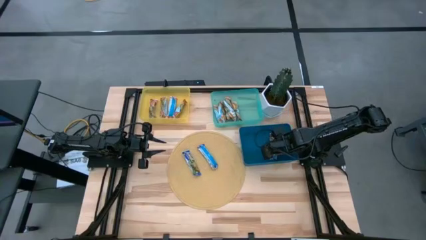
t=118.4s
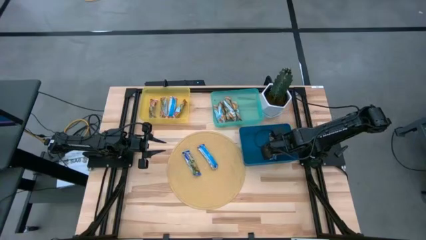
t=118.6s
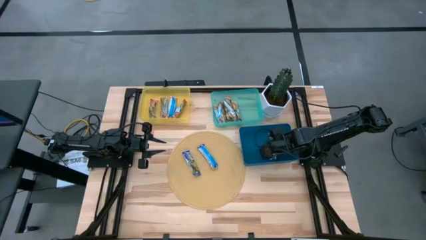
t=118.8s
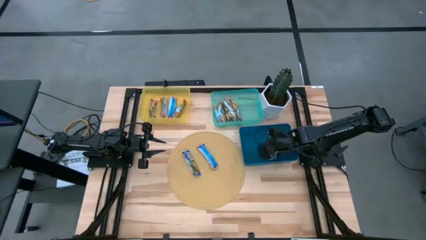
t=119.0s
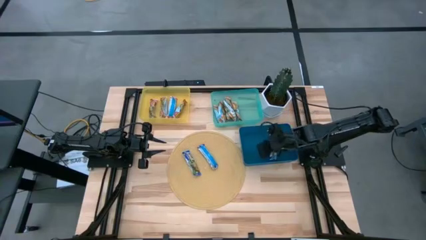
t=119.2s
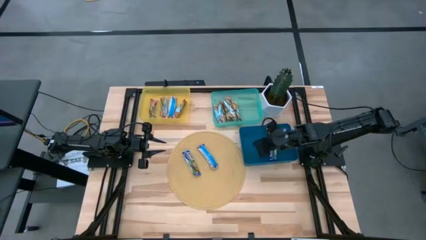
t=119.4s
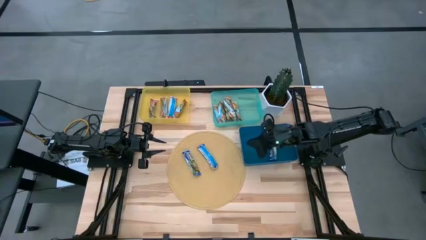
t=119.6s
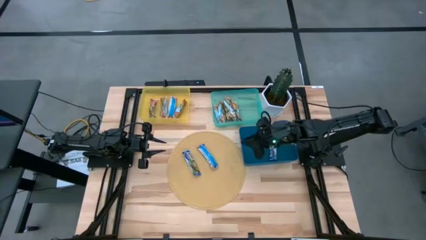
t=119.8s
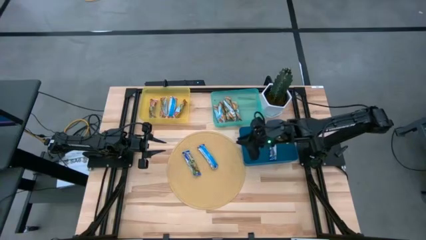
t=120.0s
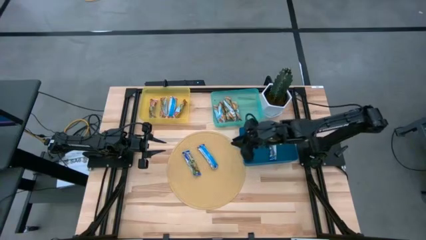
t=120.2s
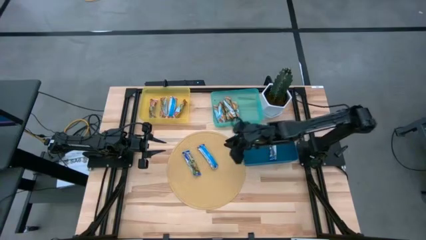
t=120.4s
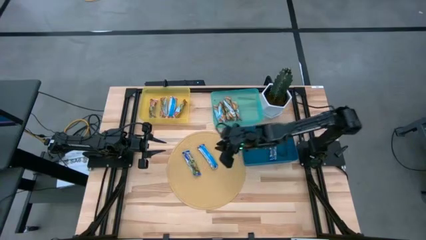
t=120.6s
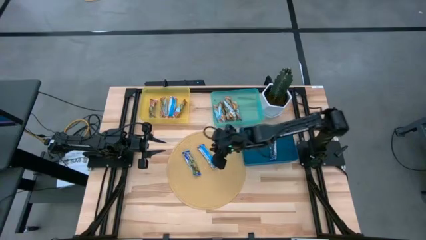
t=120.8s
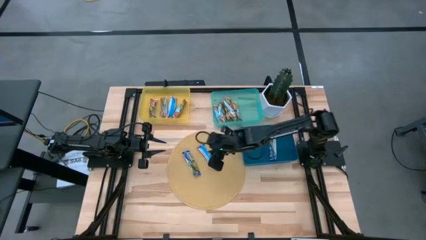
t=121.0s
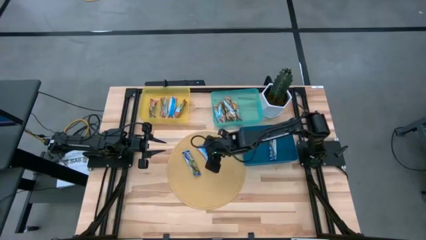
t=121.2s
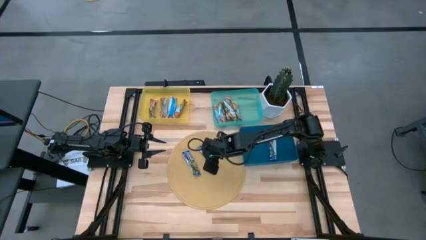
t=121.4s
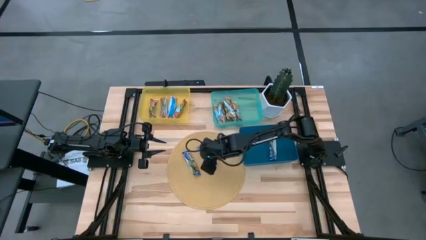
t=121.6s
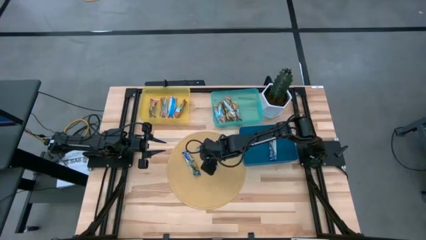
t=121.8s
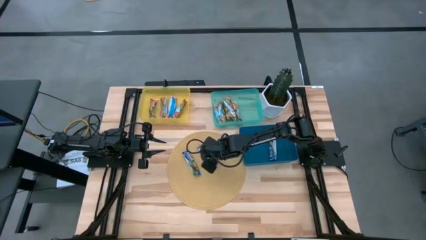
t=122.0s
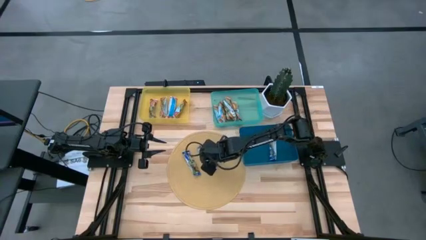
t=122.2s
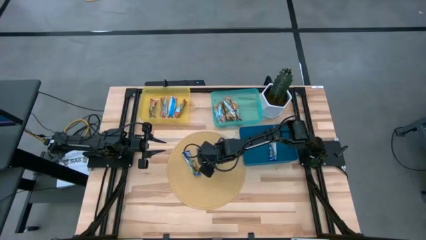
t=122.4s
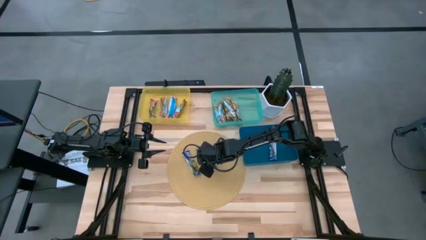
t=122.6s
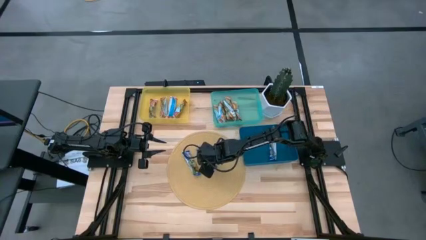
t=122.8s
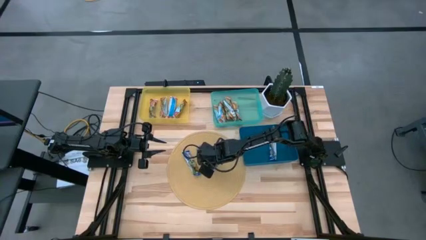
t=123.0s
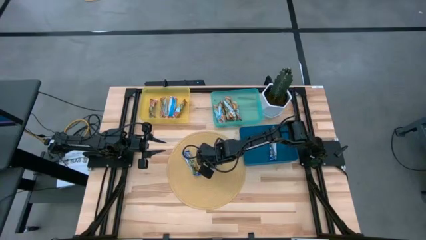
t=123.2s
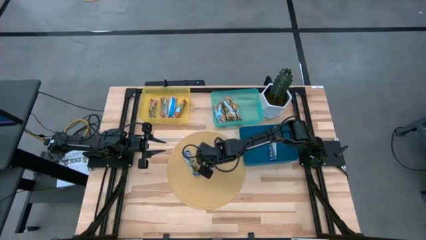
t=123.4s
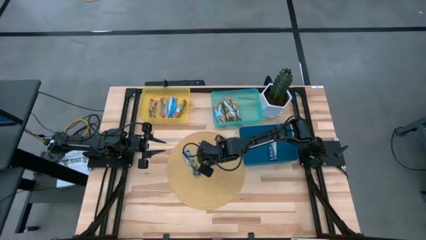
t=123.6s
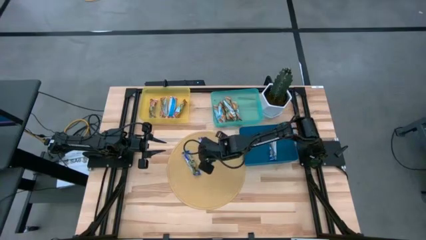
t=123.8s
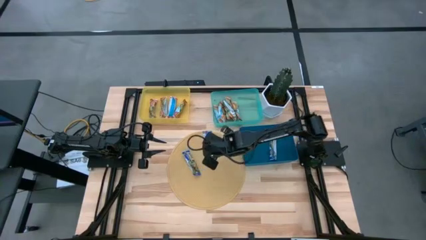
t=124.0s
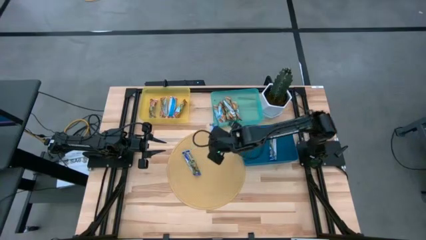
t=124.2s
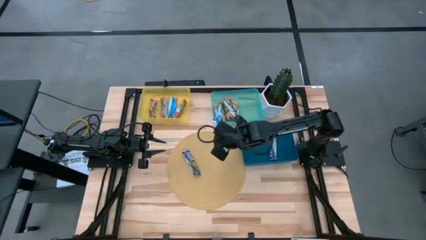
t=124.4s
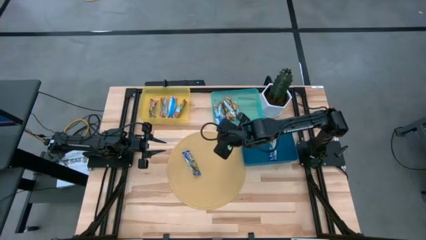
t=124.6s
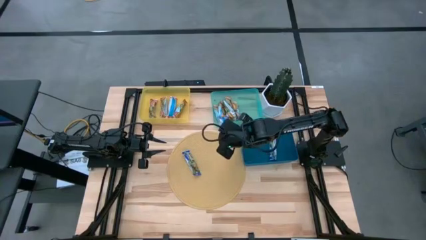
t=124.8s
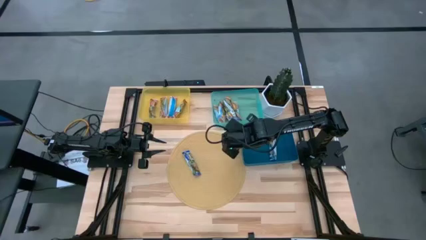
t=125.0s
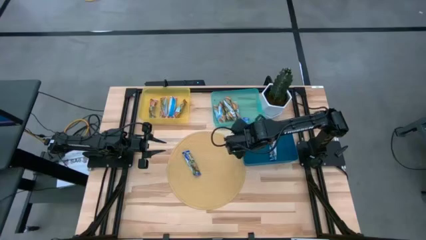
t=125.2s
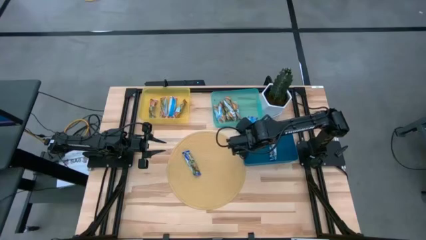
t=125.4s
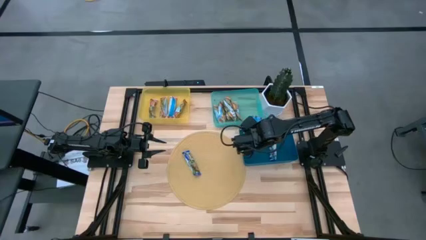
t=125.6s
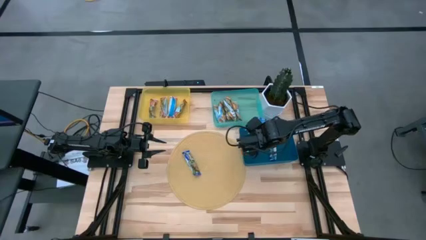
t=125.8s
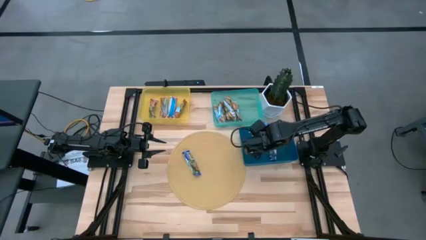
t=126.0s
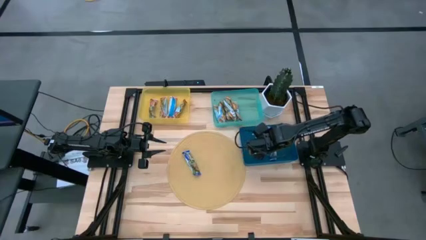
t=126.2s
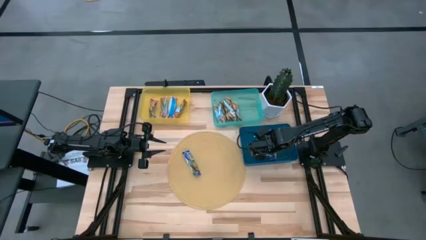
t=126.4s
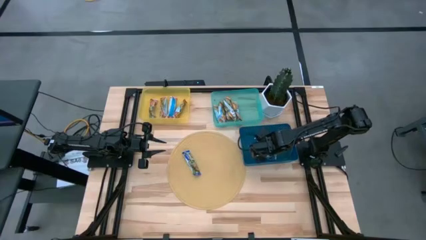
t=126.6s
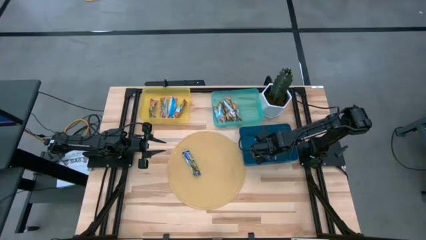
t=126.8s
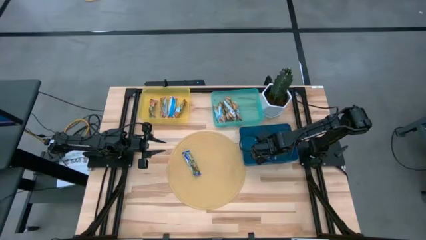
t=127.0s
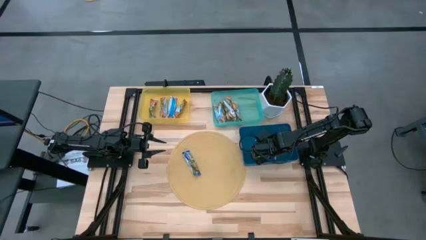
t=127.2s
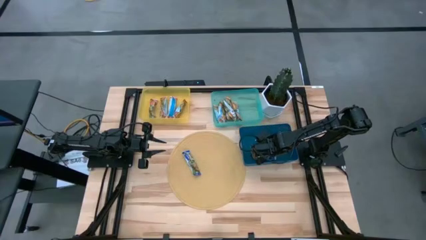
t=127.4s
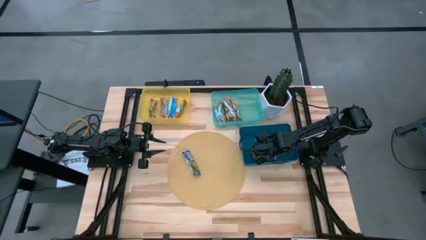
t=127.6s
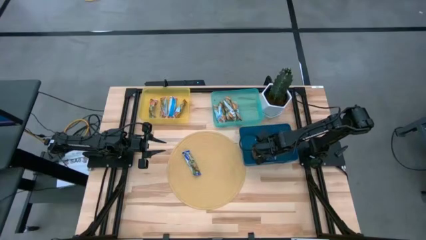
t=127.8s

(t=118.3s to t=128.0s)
Task: Pick and place Granola Bars by type
Put the blue granola bar into the blue bin

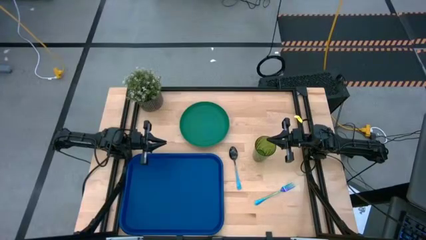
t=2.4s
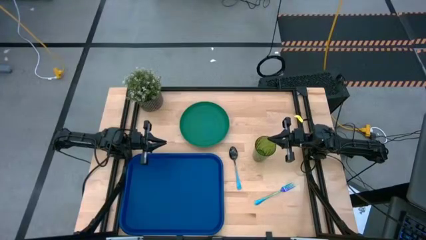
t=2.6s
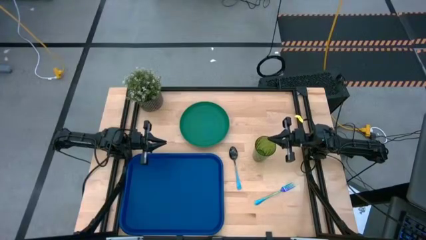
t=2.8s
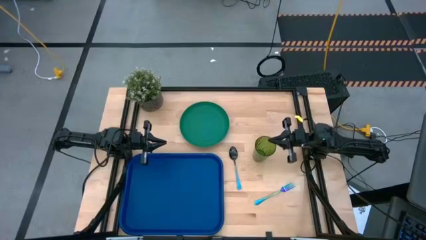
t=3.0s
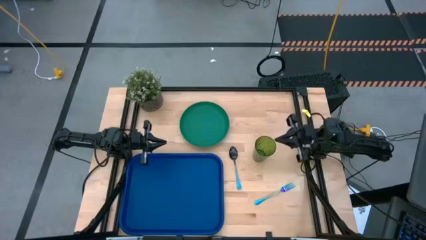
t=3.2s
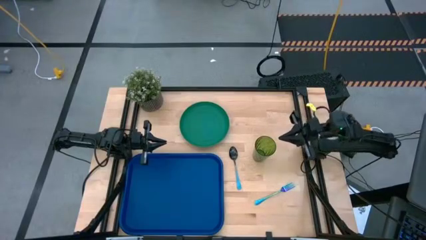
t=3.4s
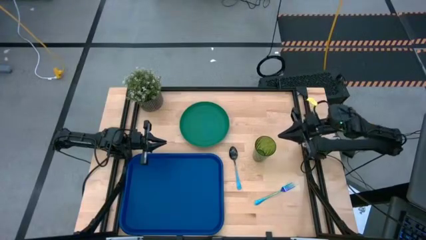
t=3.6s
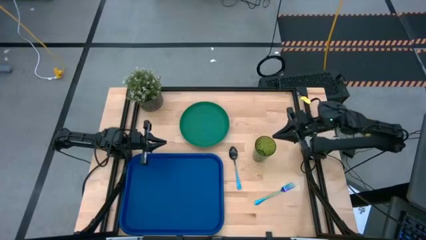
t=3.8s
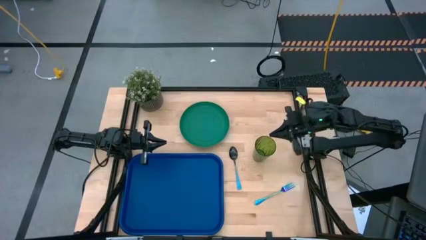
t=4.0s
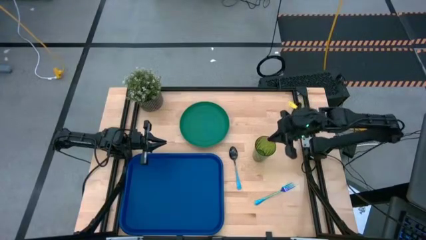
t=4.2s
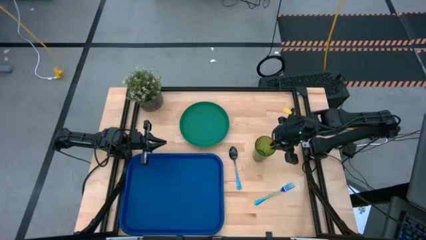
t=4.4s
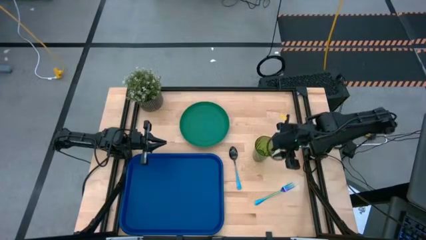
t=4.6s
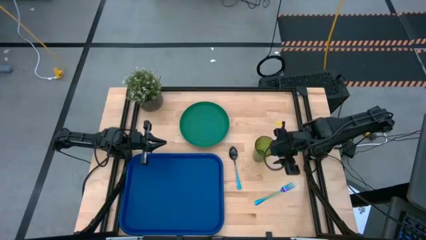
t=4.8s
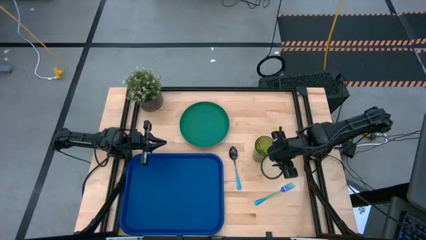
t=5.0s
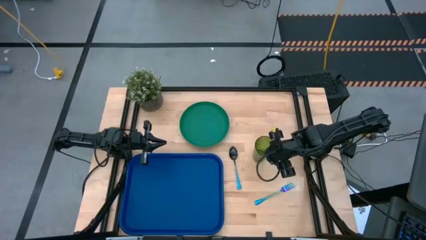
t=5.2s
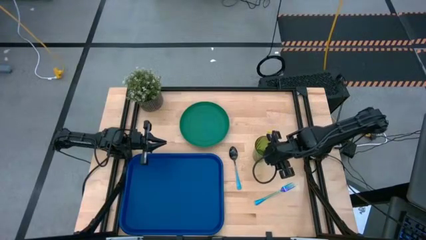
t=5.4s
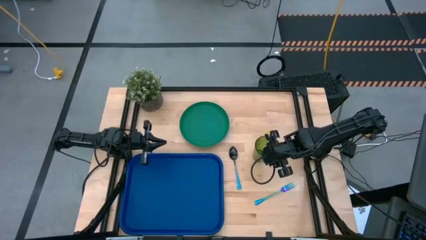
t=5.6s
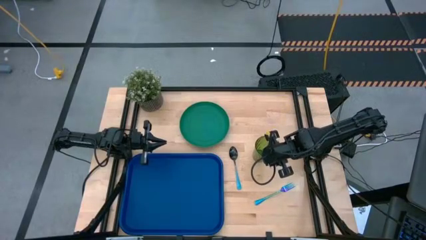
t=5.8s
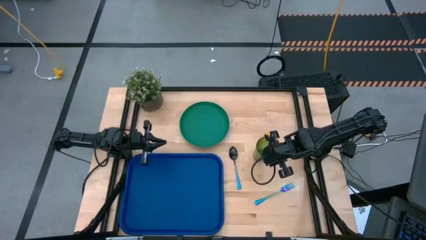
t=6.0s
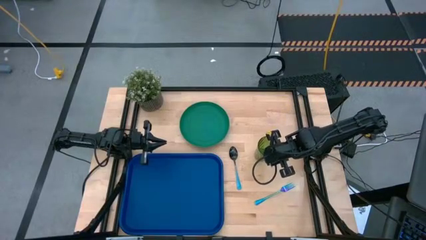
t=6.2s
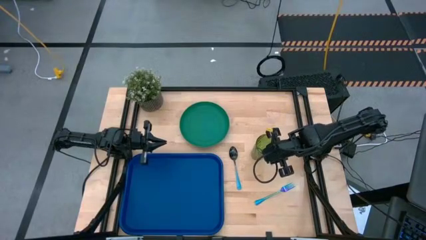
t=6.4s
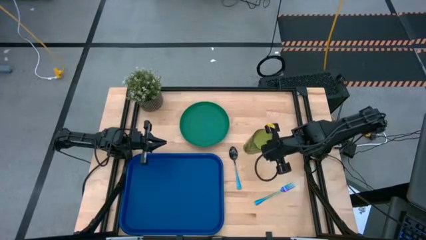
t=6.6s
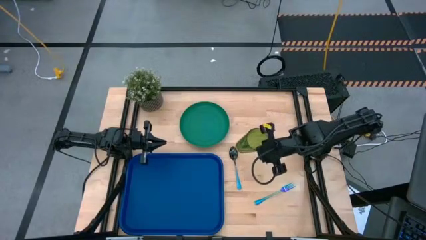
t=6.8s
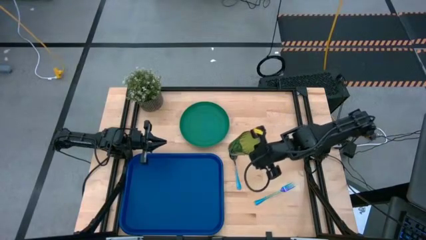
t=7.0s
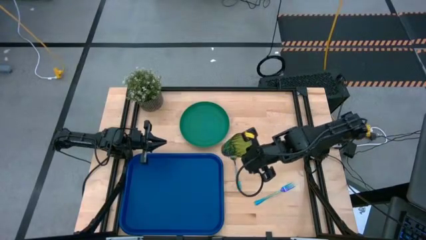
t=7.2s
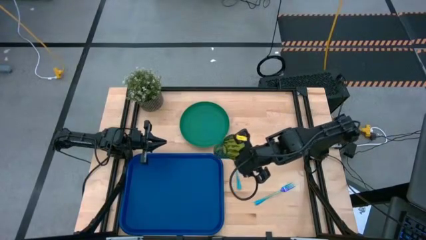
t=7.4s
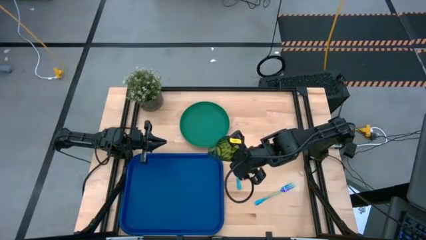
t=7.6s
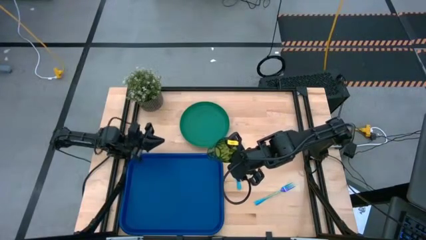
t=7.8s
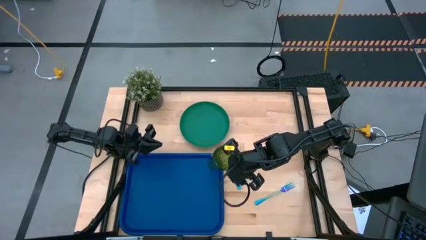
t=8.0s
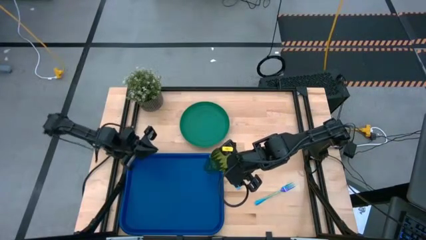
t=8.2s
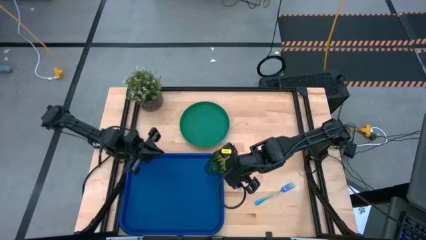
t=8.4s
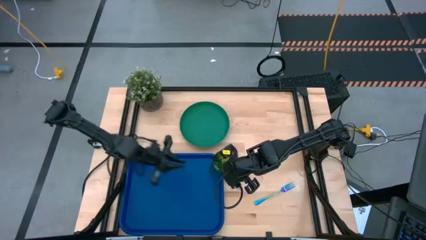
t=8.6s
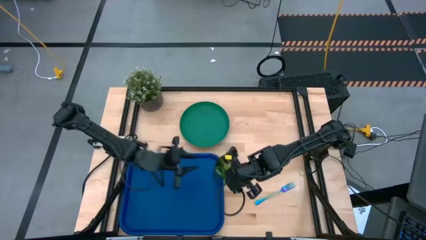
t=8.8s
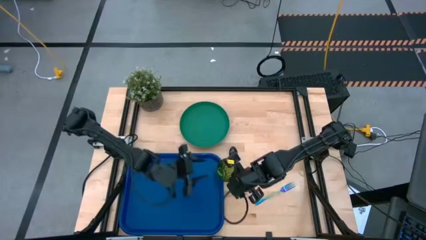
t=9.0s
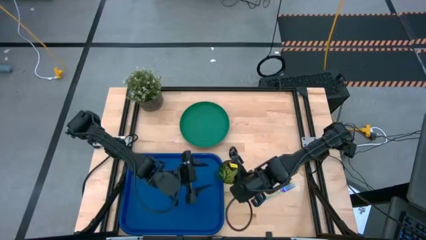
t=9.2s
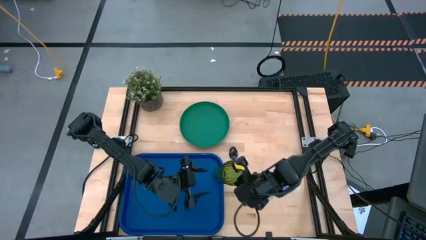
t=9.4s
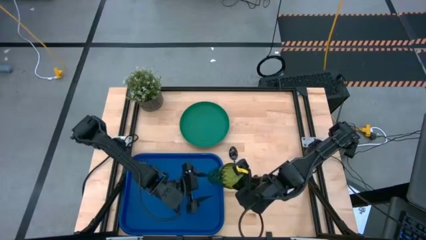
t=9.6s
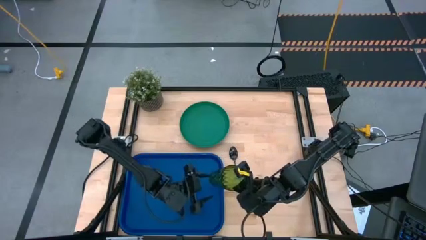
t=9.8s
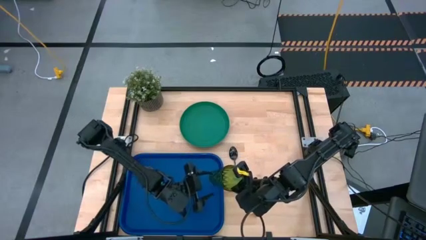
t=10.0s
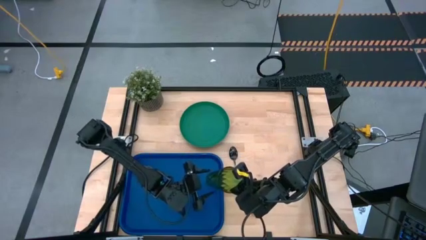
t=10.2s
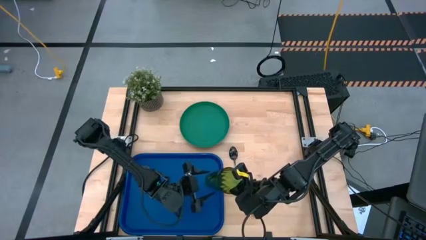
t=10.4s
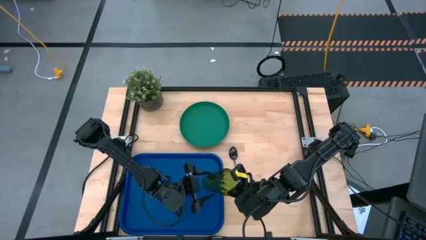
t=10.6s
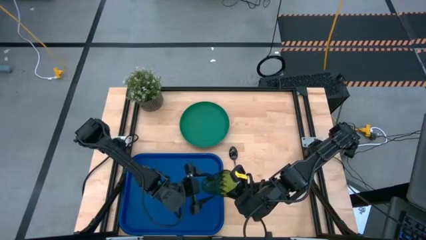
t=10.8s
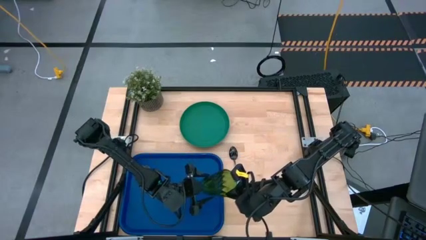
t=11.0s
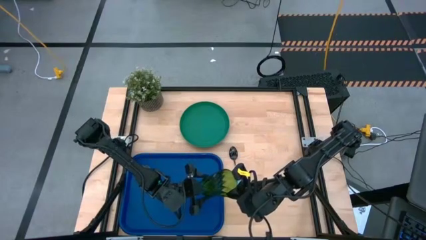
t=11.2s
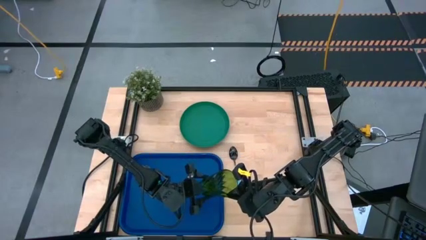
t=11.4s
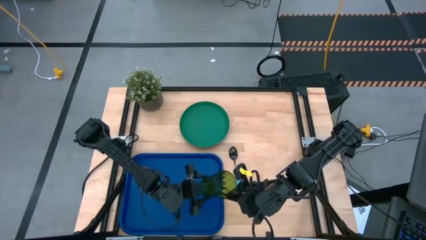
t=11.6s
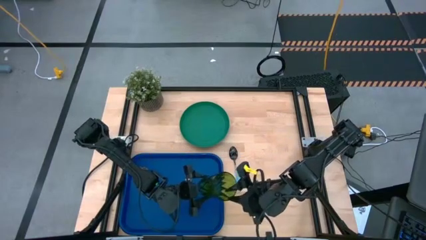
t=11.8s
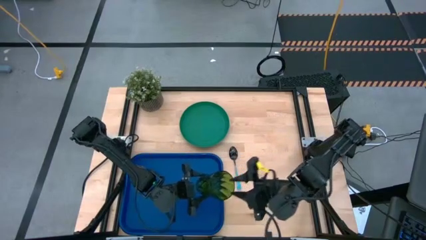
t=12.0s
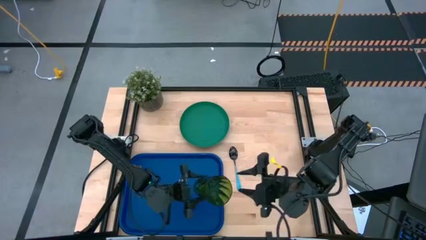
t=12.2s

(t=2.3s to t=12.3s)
Task: Pick and place plate/cup/fork/spoon on tray
Put the green glass on the dark blue tray
